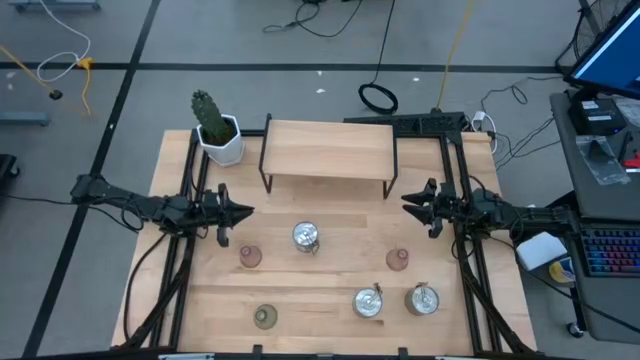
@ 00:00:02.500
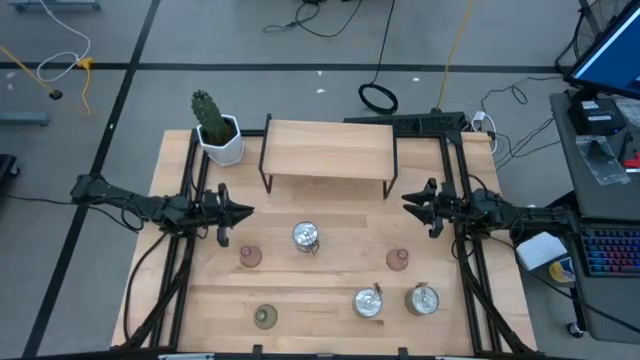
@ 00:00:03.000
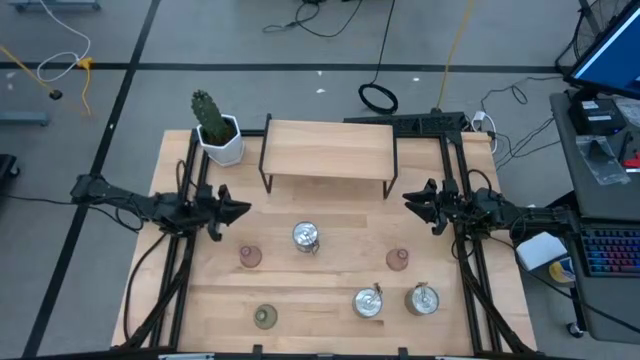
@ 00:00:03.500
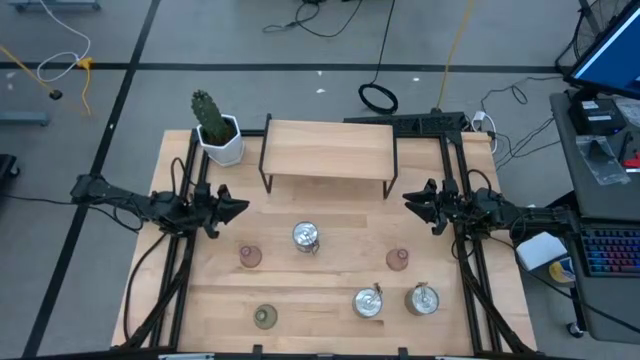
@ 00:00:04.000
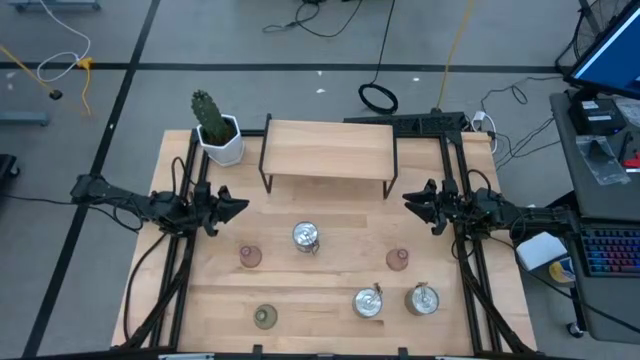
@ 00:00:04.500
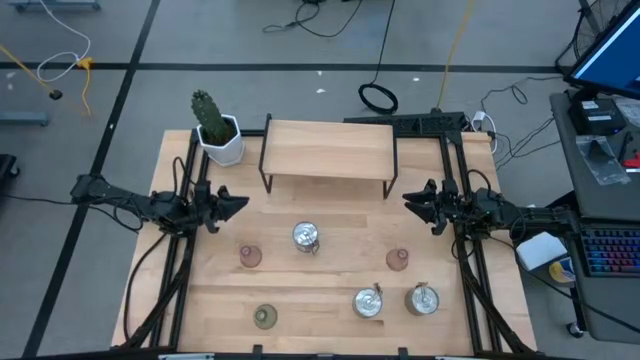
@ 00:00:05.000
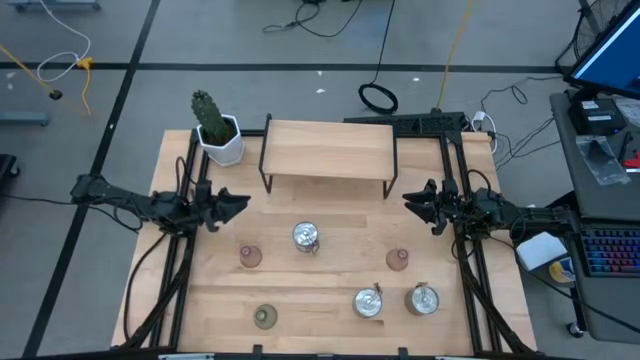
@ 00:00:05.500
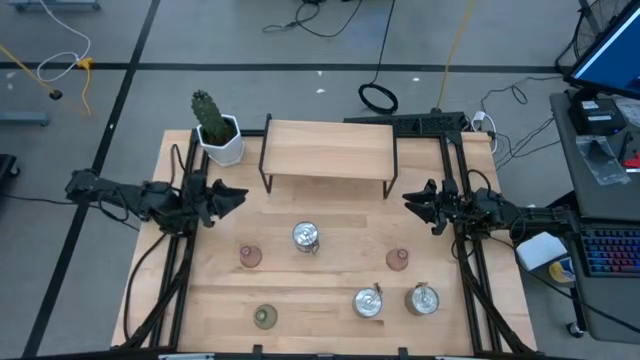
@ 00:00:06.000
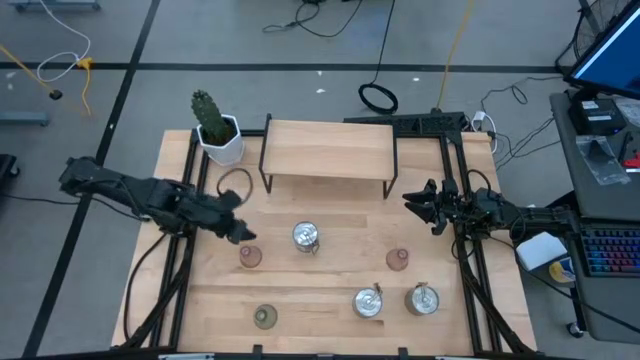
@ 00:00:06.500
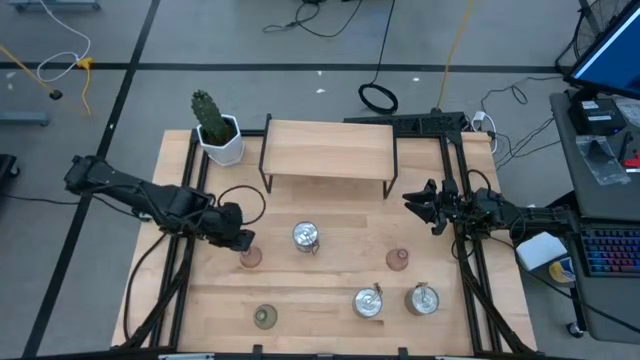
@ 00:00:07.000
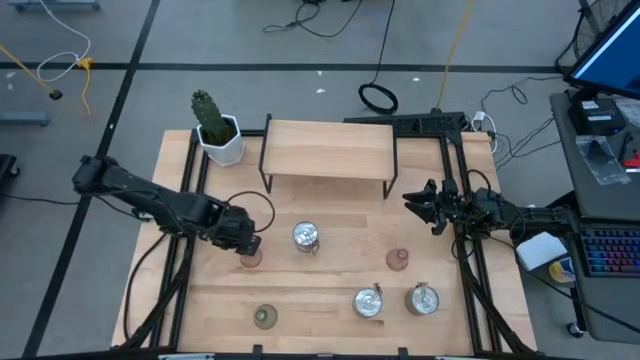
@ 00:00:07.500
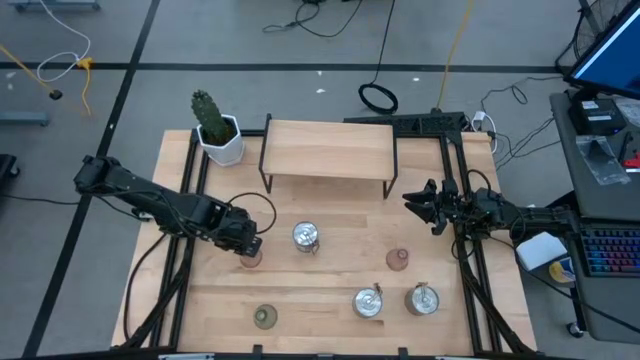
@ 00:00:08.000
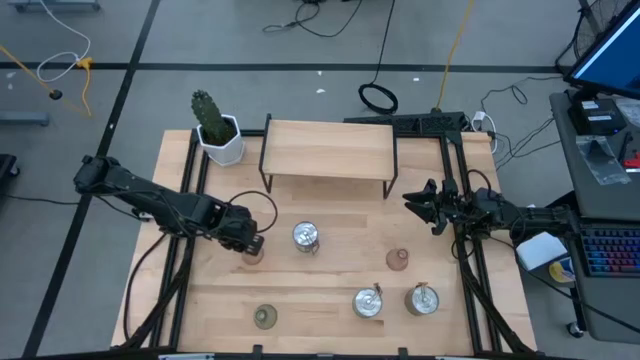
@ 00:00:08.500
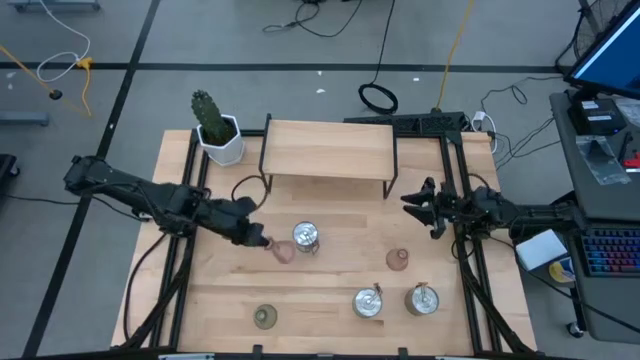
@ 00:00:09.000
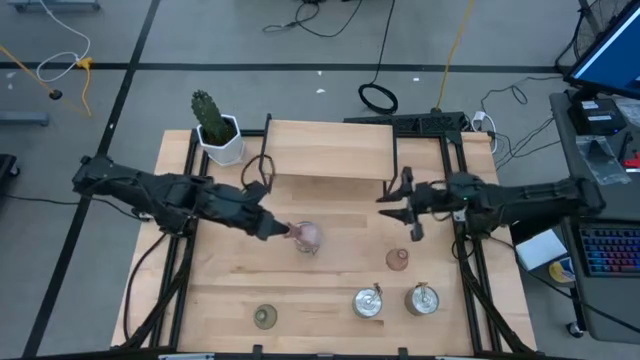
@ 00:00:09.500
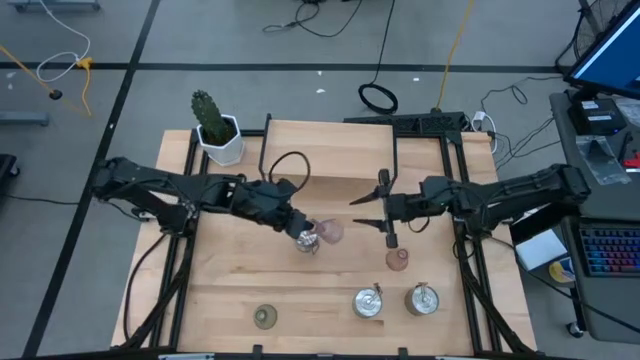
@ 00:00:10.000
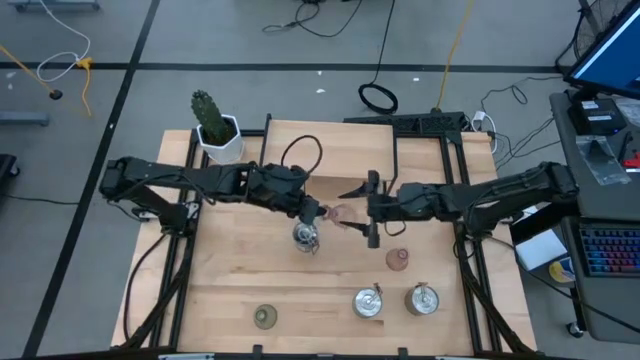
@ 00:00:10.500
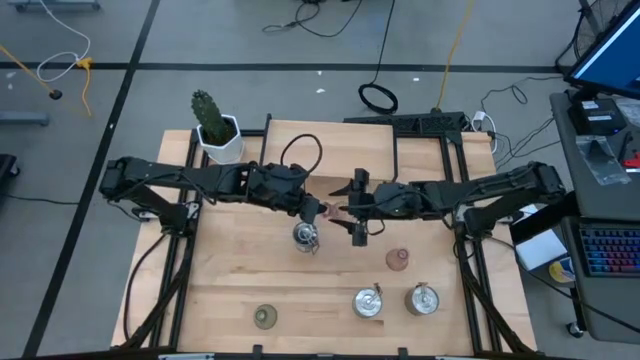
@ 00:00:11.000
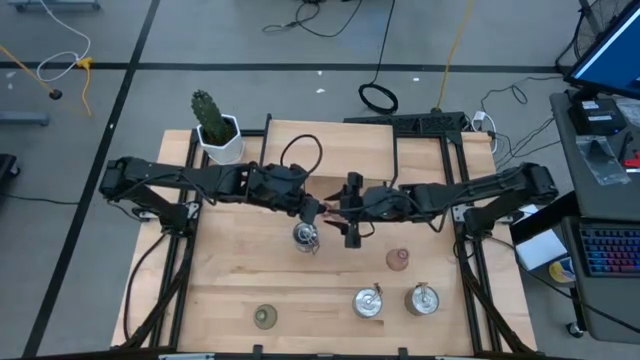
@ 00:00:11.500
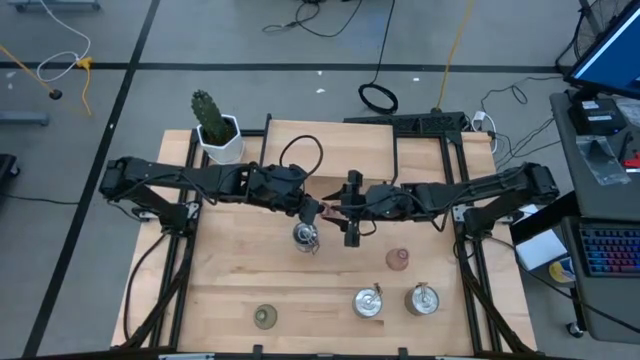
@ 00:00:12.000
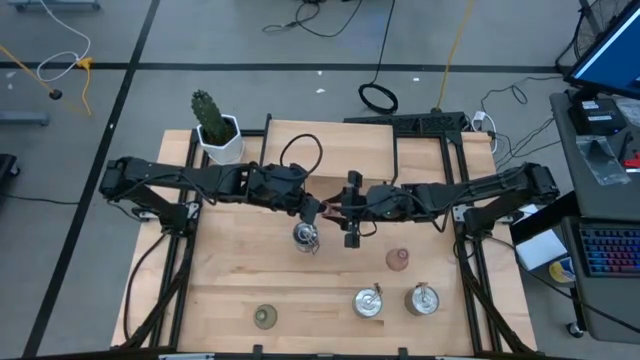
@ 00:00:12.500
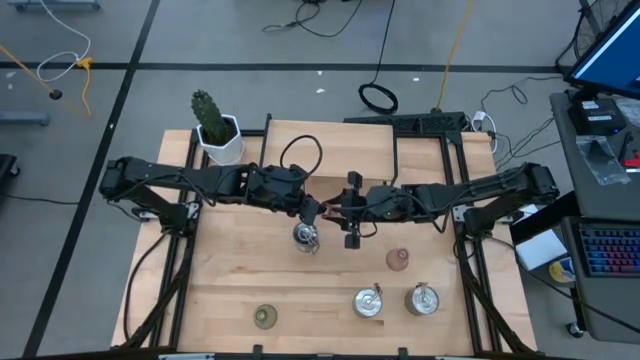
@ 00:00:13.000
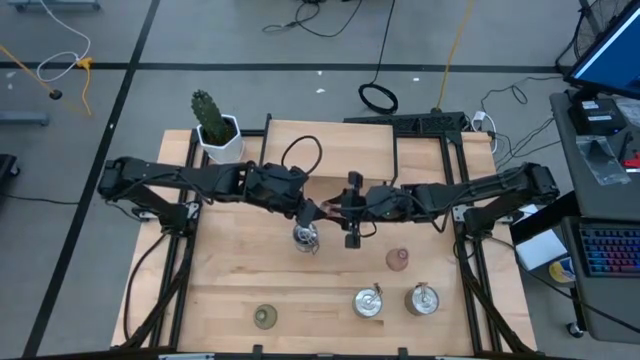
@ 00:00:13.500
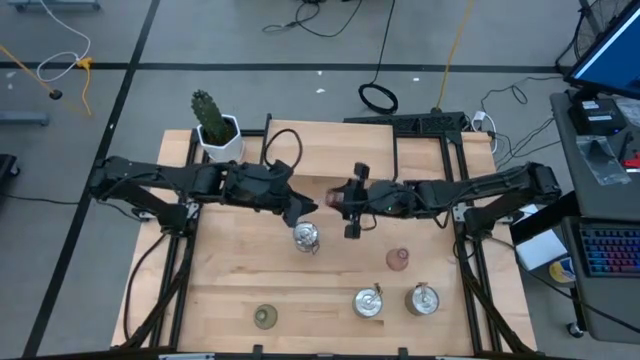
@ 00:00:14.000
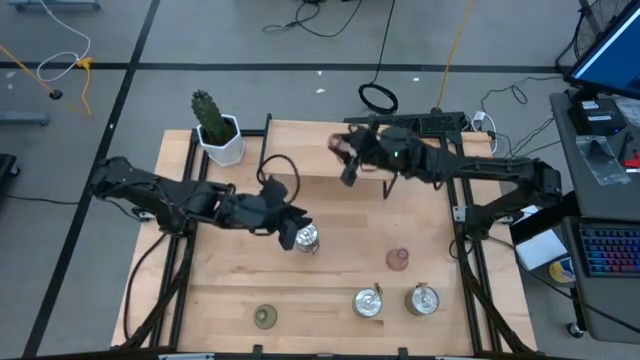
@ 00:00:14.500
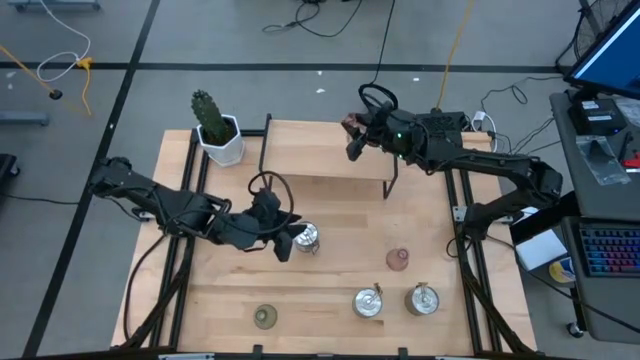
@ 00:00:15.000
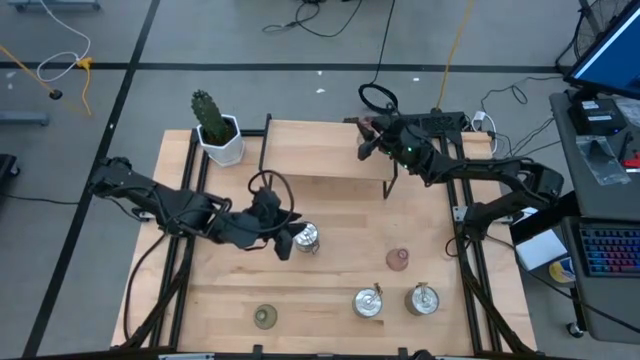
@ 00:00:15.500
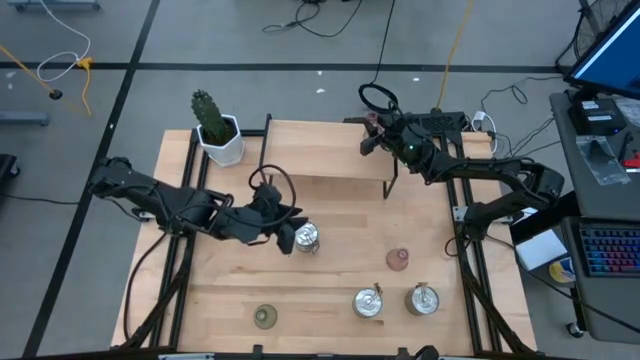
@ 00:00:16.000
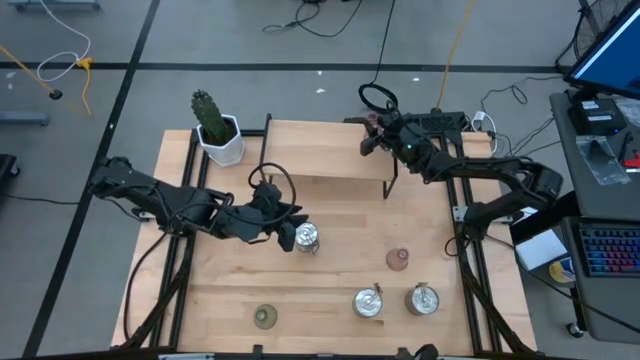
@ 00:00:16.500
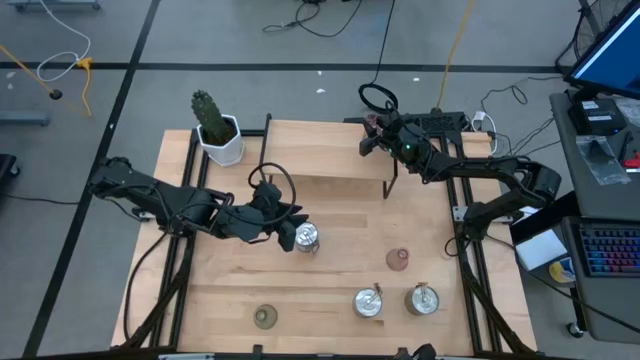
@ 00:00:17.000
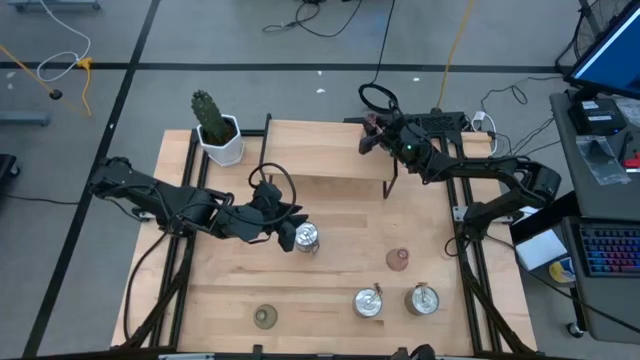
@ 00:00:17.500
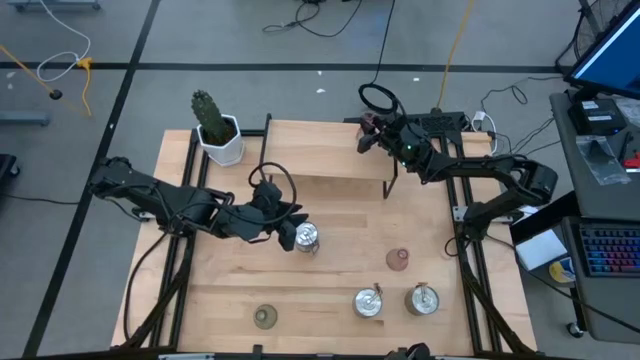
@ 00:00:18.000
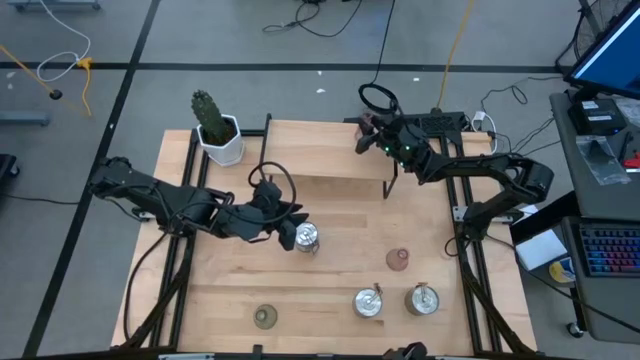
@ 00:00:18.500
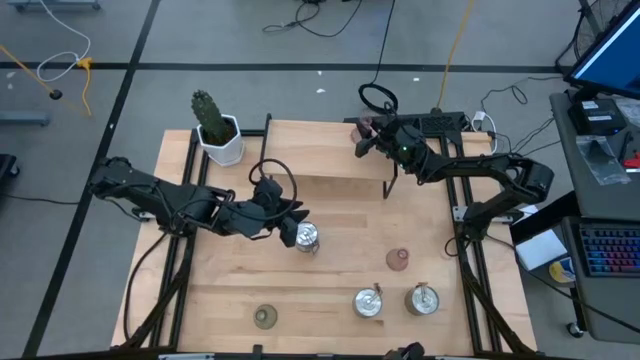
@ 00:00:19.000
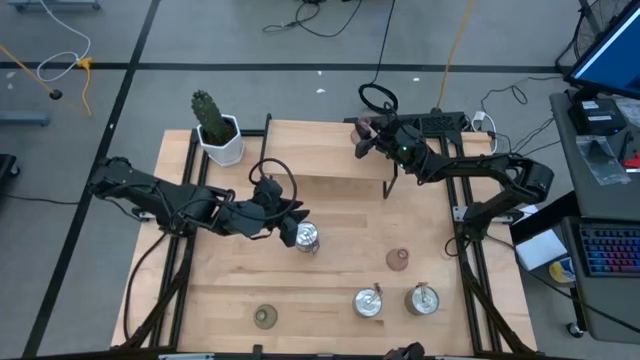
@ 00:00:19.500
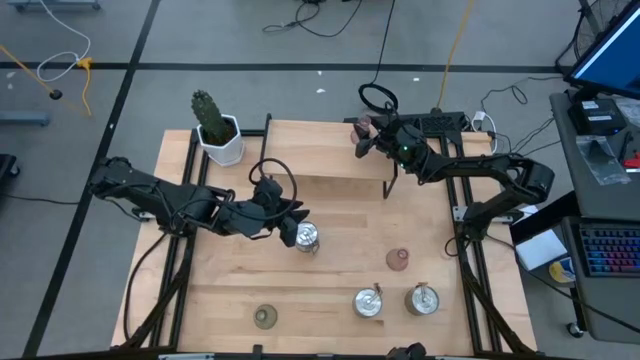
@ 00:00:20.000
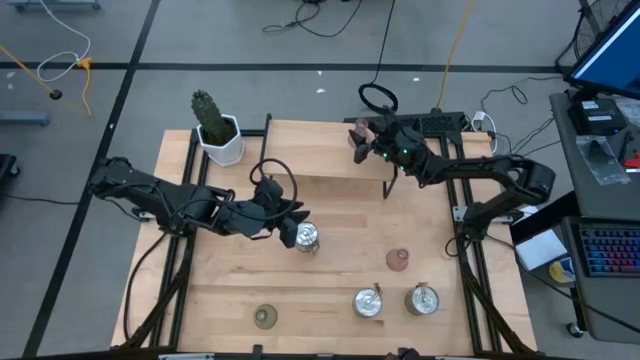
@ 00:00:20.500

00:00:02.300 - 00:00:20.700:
Task: Pick & Place candle stick holders
Put the left red candle holder on the shelf

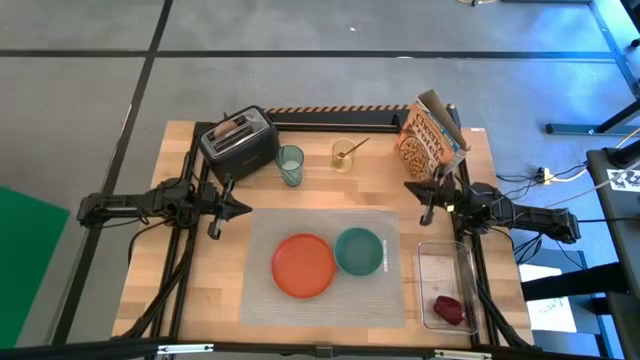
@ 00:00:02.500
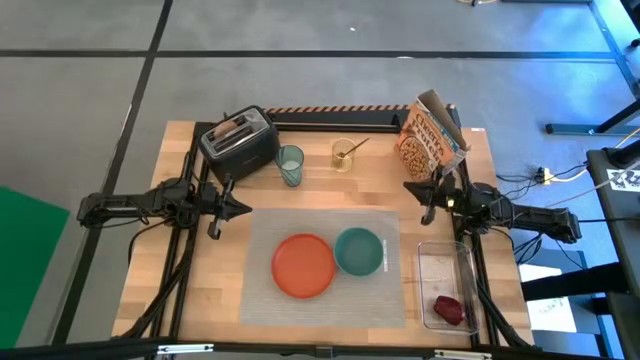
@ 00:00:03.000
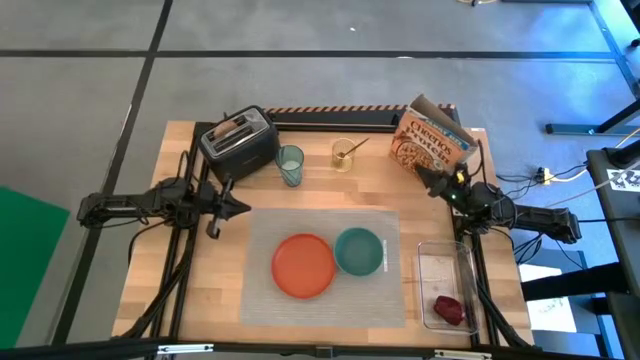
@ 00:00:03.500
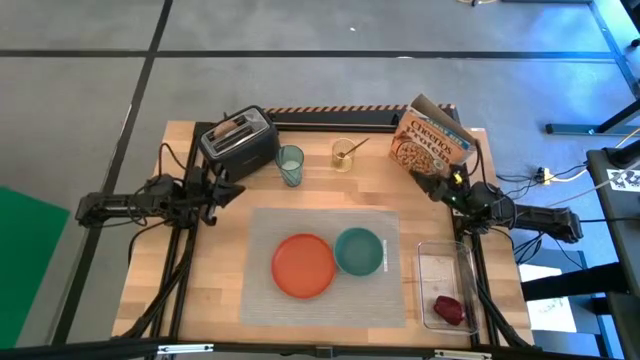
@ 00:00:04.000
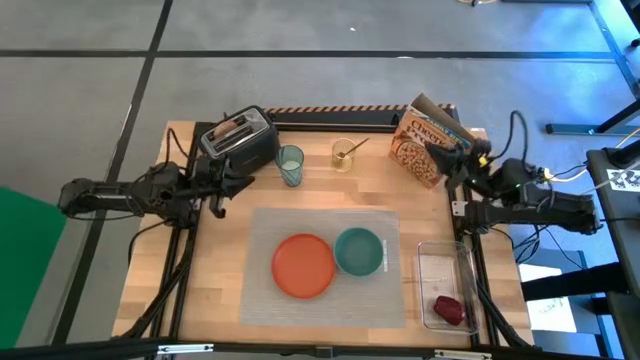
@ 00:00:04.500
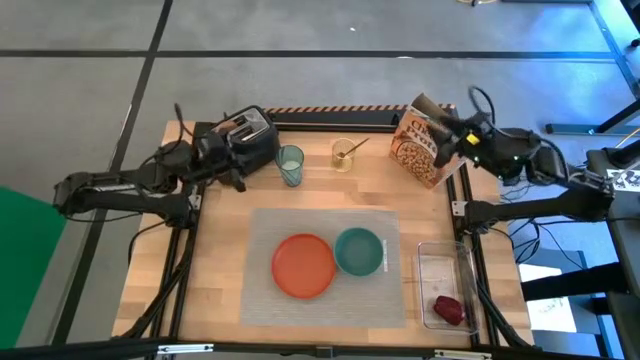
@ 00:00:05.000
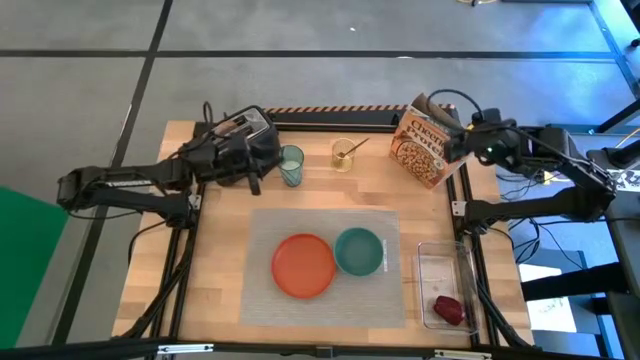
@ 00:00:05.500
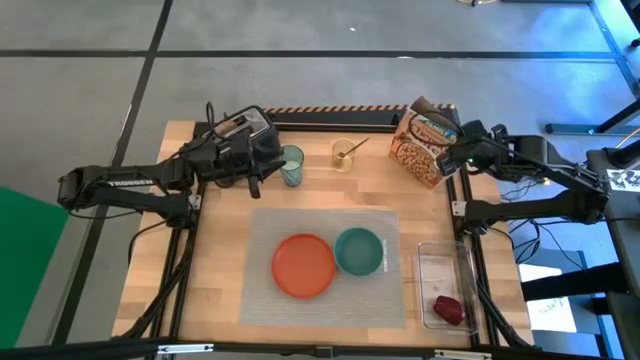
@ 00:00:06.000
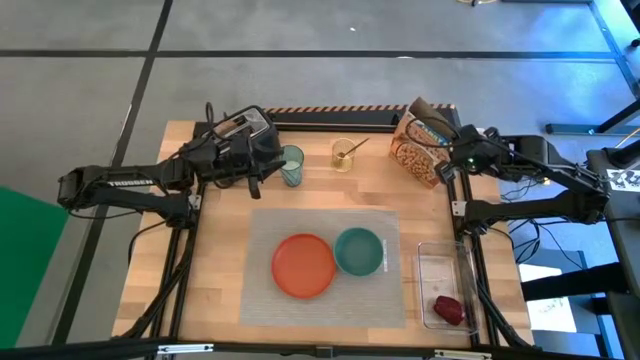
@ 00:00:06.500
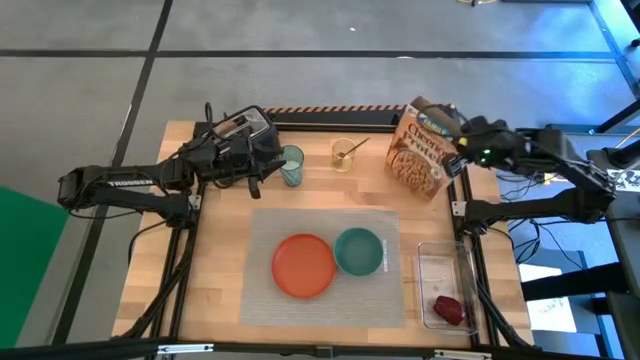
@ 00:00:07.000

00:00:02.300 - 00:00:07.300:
Task: Arrange a breakfast setting
Pour the cereal in the bowl
